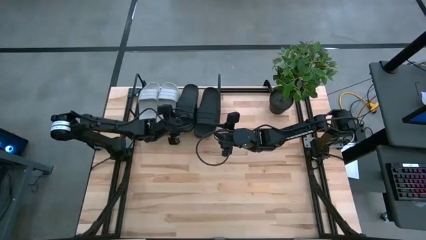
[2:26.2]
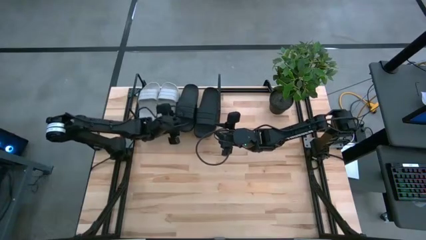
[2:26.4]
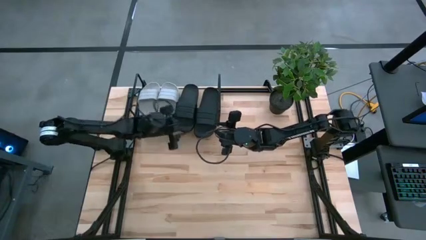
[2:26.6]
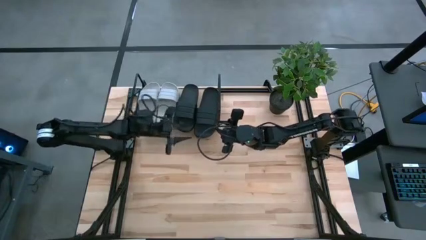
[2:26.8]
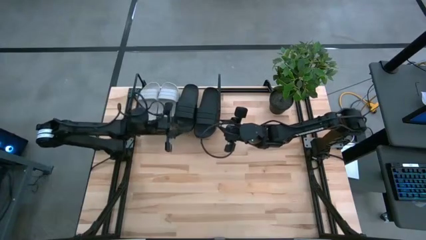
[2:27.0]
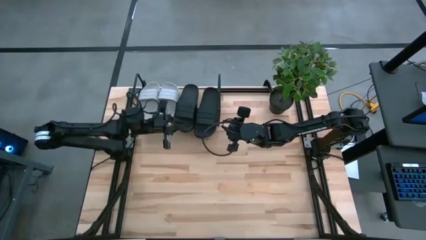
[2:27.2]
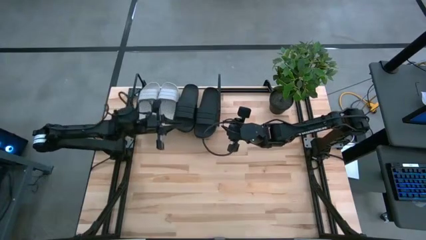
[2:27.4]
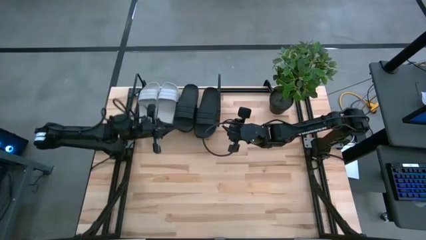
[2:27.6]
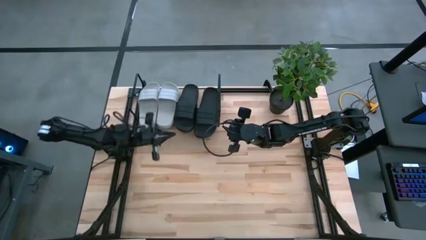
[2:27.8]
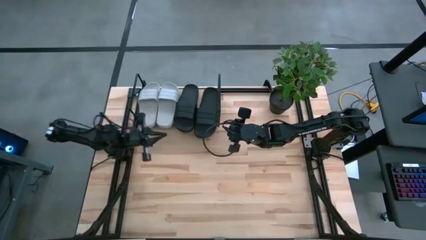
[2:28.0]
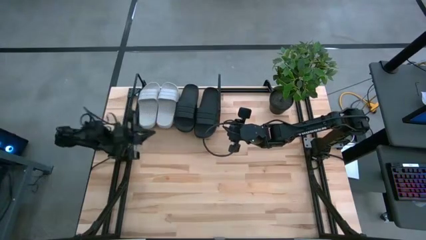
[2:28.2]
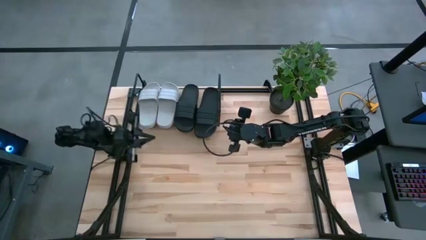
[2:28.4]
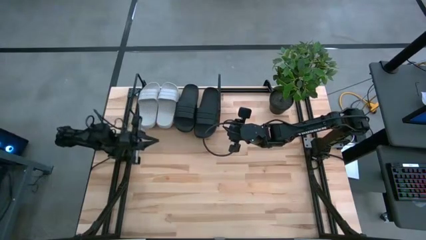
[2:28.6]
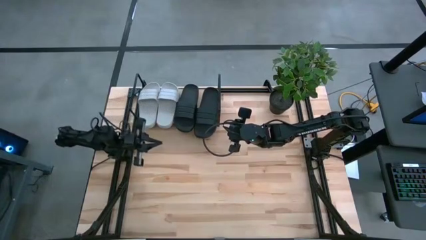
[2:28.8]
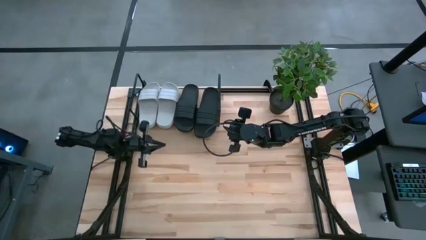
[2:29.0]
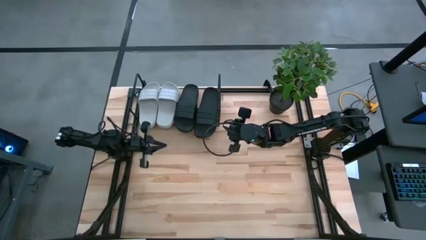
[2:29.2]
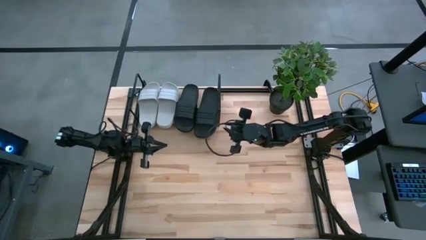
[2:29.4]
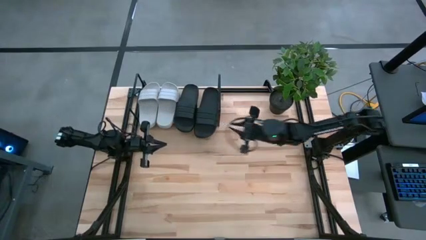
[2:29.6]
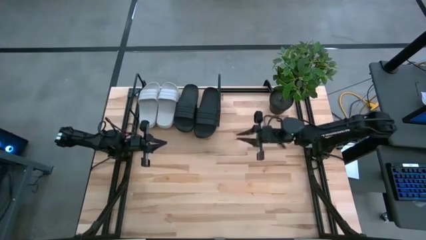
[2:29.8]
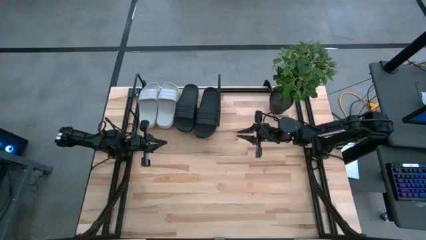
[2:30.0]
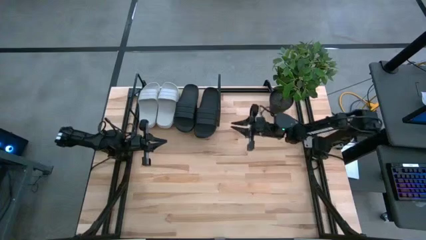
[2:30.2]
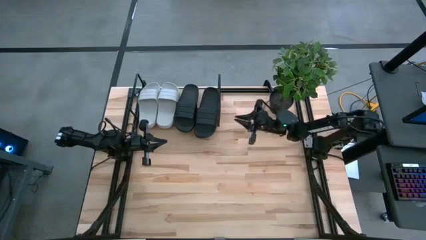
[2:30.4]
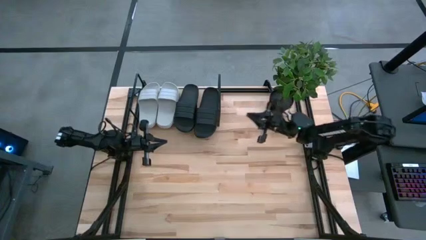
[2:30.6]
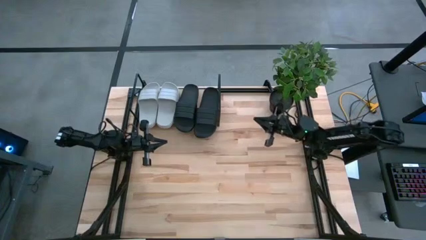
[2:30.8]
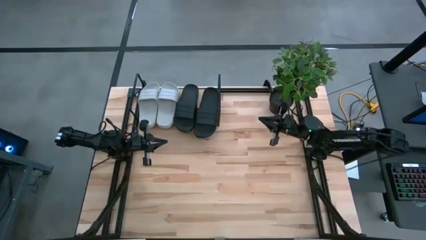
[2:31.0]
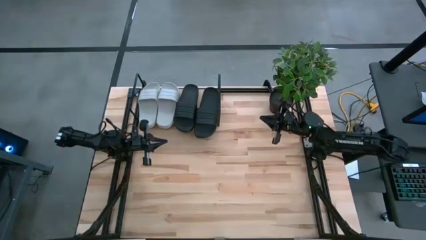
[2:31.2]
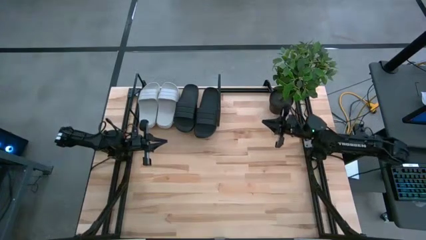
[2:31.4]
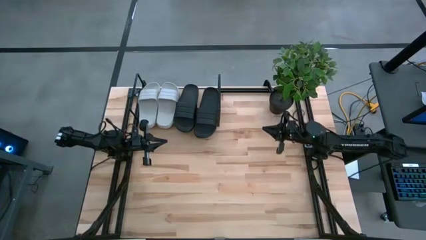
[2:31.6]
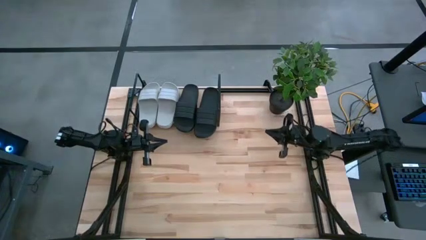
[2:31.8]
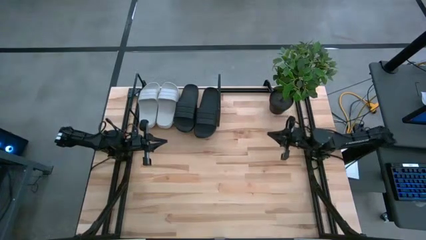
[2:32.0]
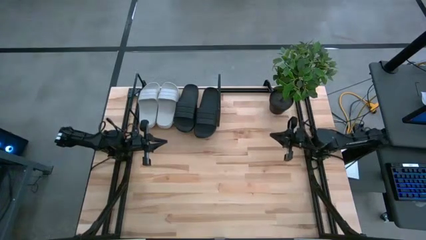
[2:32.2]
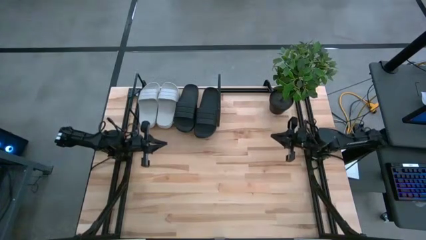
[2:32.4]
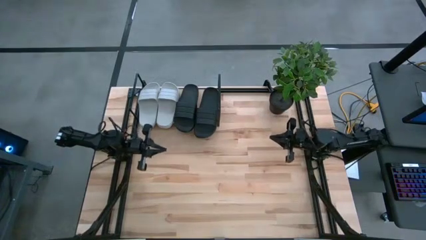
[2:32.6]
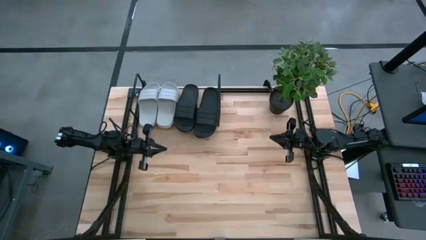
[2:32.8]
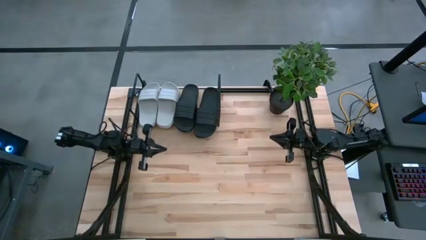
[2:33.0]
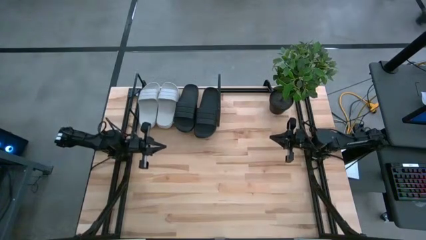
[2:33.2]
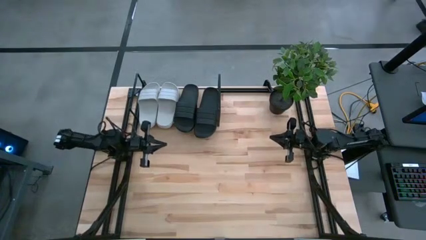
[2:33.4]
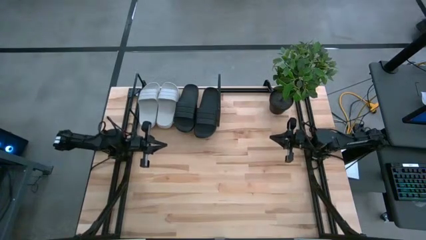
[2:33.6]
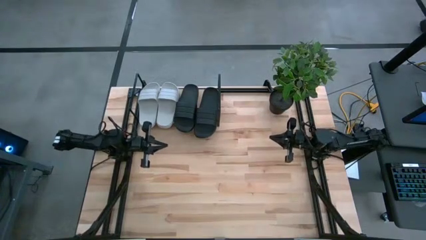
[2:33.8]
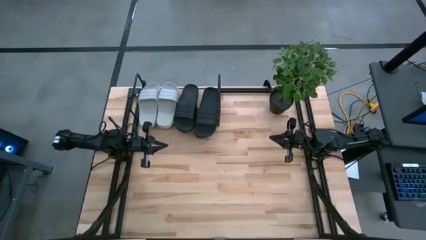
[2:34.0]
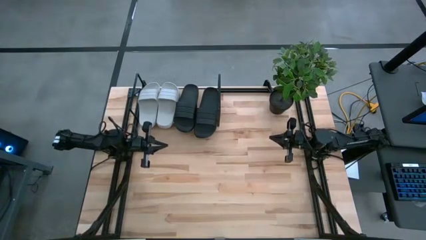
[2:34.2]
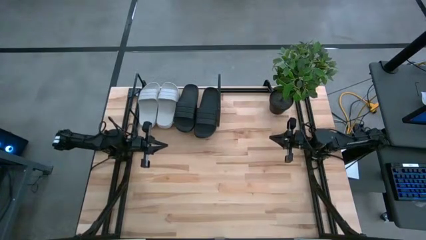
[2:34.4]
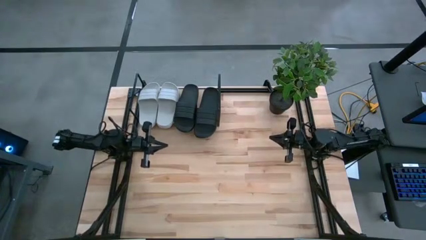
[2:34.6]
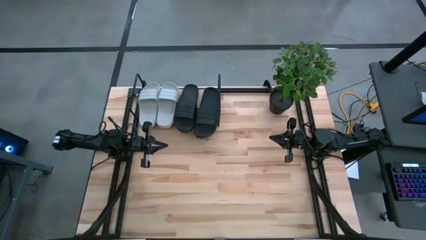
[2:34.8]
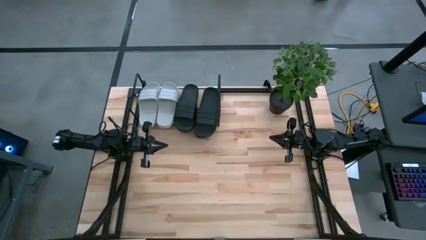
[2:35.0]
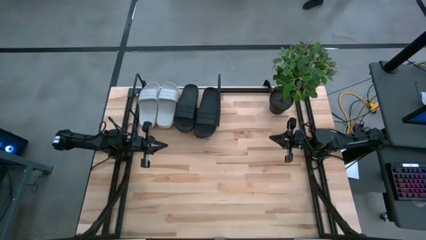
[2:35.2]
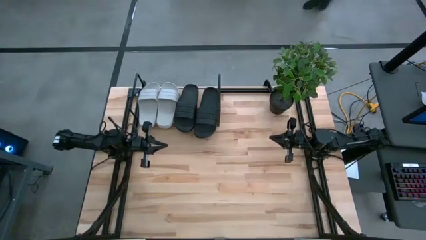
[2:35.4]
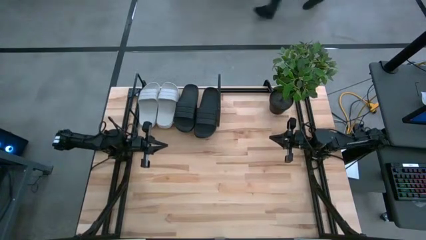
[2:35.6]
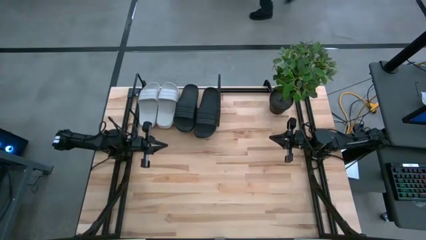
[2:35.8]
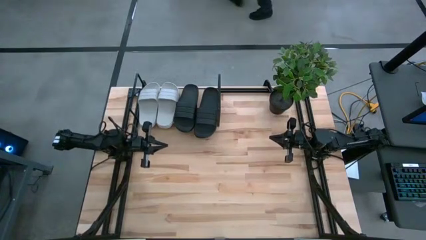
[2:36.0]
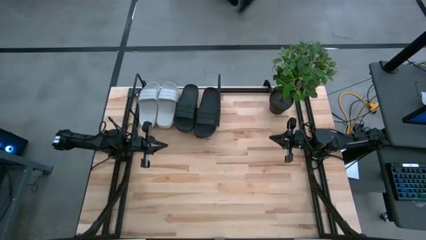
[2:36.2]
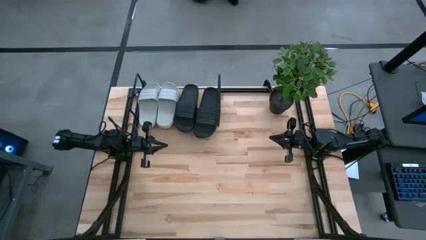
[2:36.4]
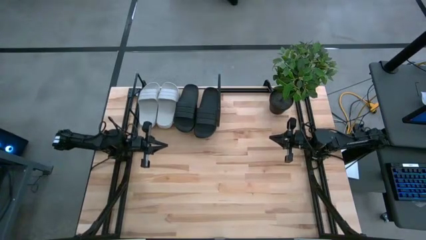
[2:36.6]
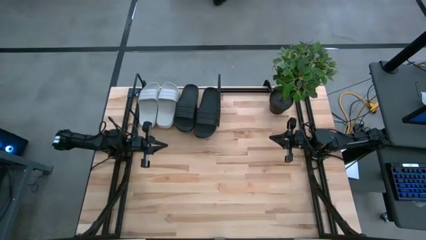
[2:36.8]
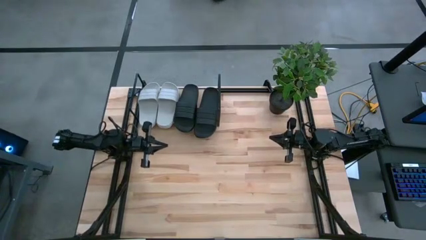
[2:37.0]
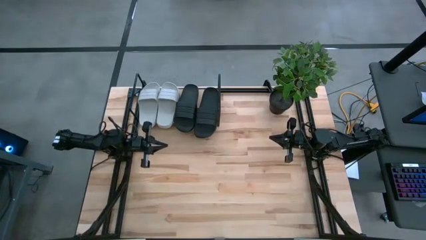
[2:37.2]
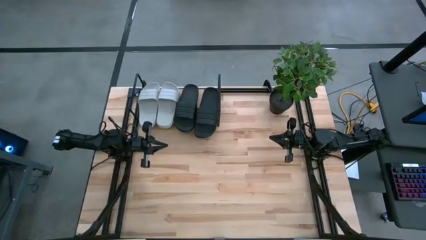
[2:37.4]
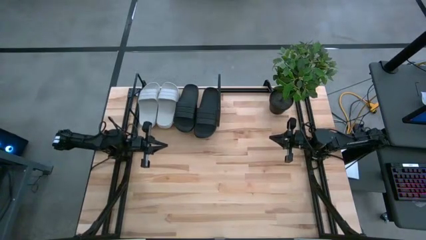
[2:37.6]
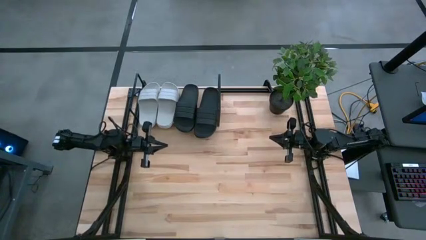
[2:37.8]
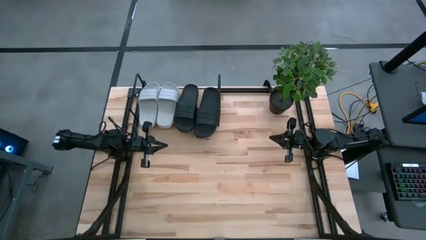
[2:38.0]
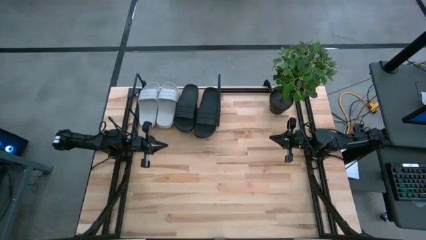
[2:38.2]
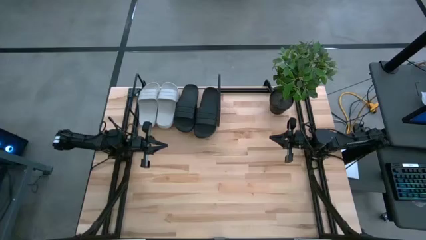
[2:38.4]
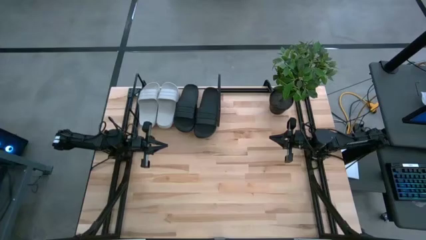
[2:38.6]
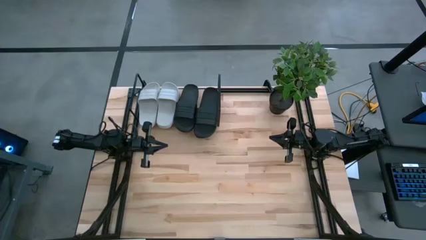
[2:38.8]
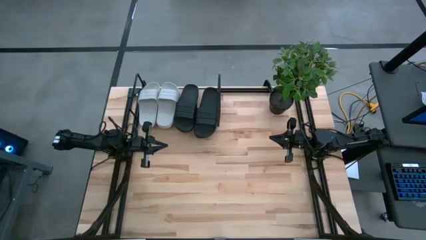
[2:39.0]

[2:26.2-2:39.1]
Task: Pick and place slides into the shelf
Return to Home Position
